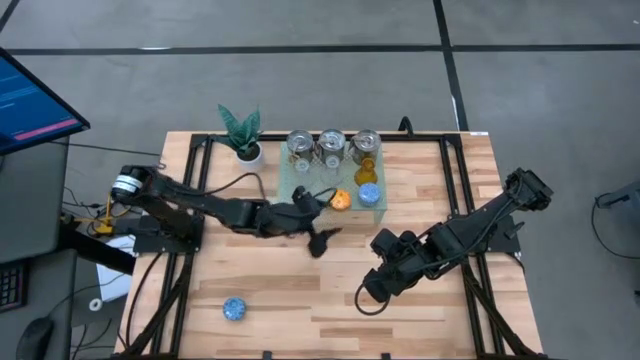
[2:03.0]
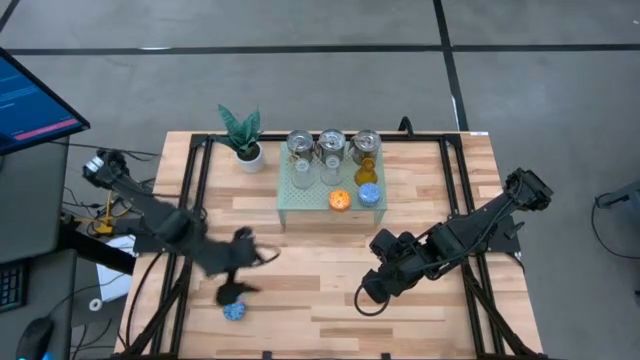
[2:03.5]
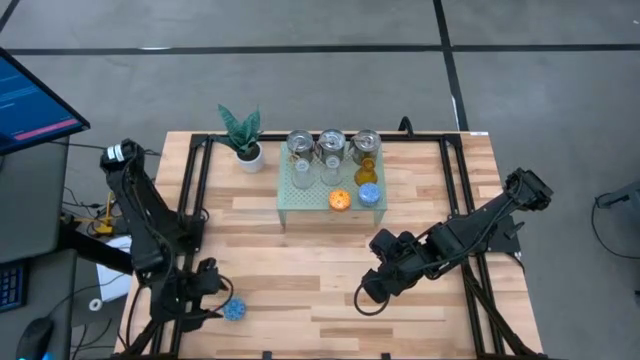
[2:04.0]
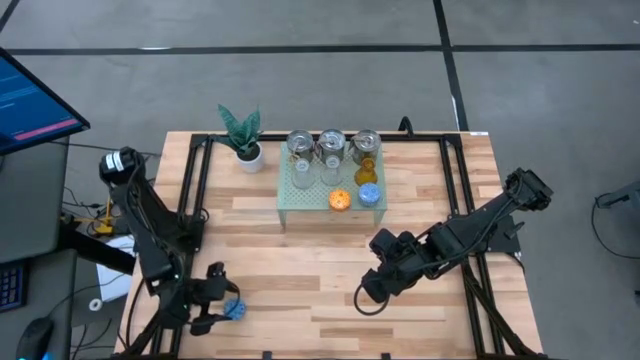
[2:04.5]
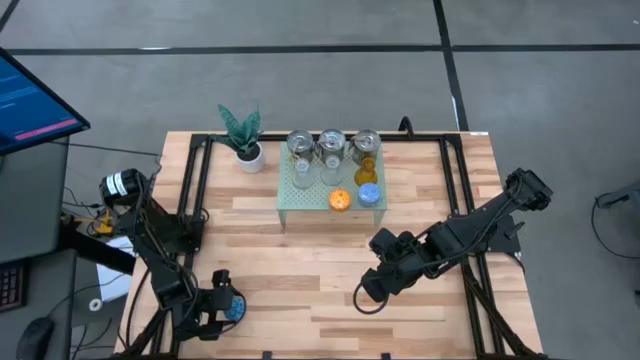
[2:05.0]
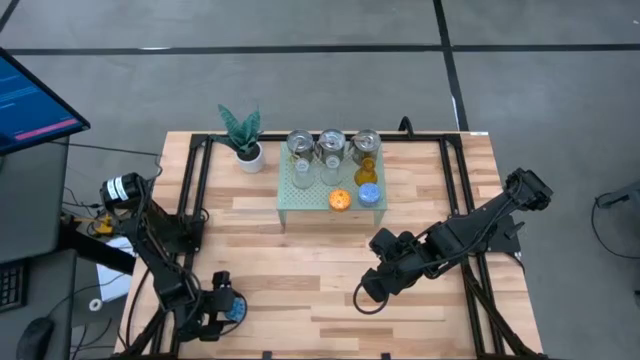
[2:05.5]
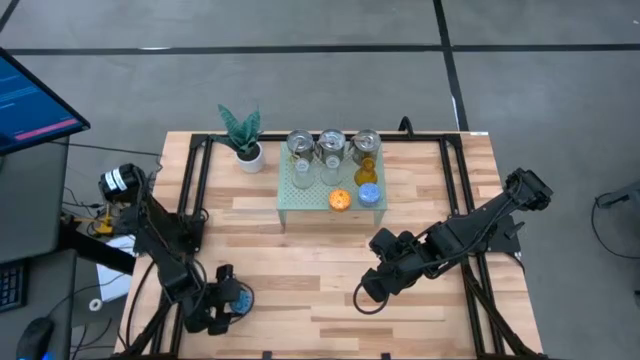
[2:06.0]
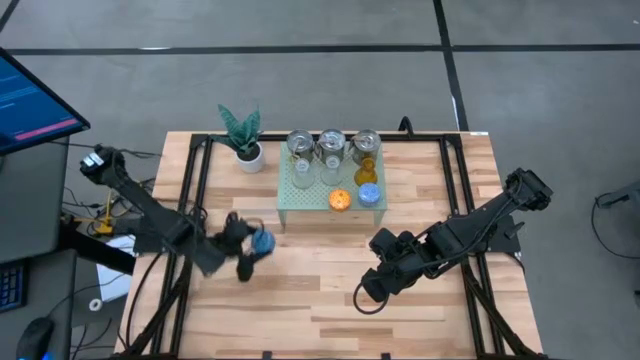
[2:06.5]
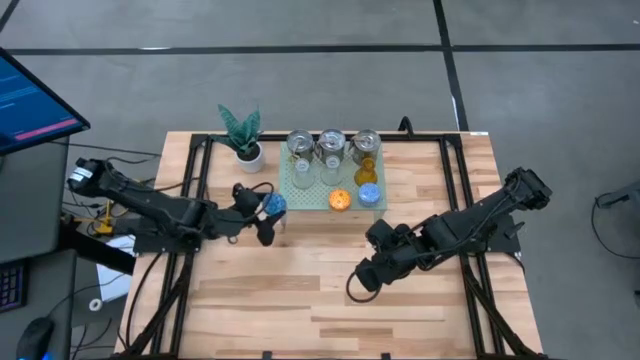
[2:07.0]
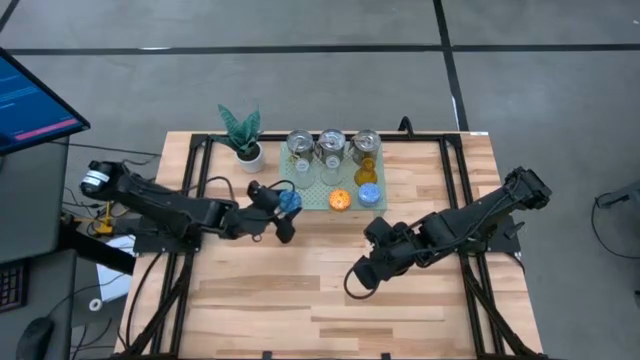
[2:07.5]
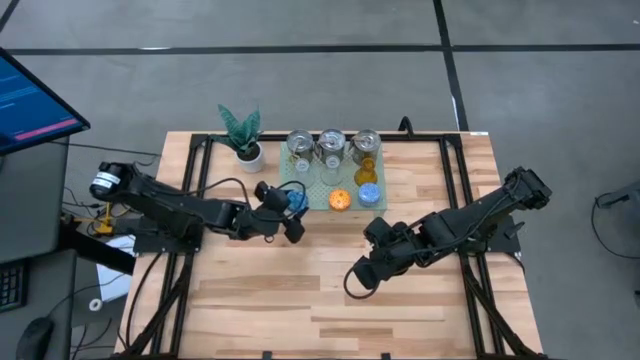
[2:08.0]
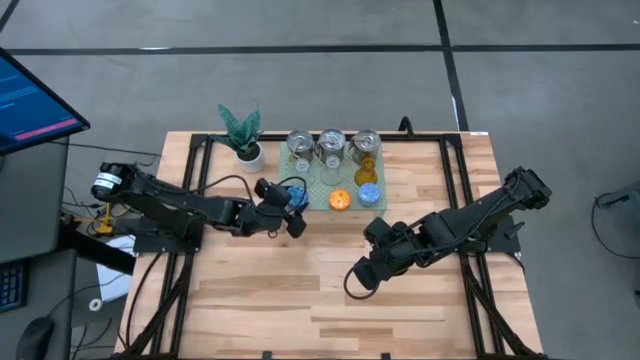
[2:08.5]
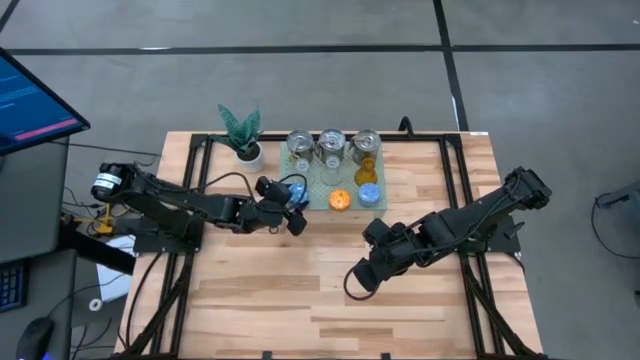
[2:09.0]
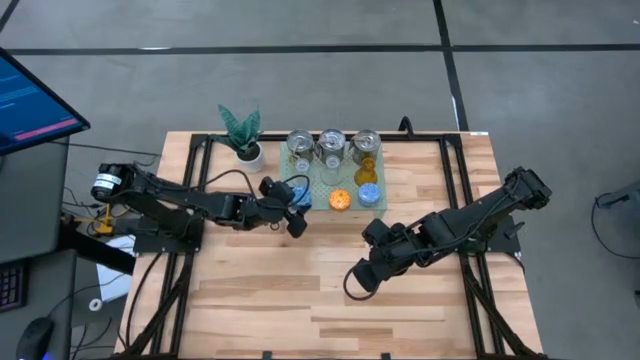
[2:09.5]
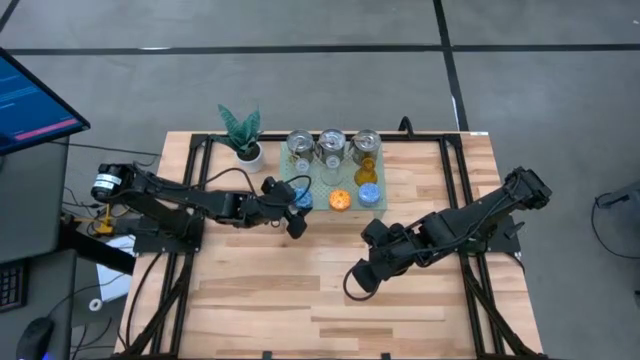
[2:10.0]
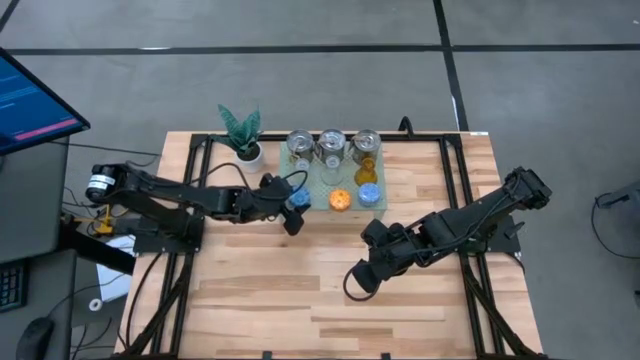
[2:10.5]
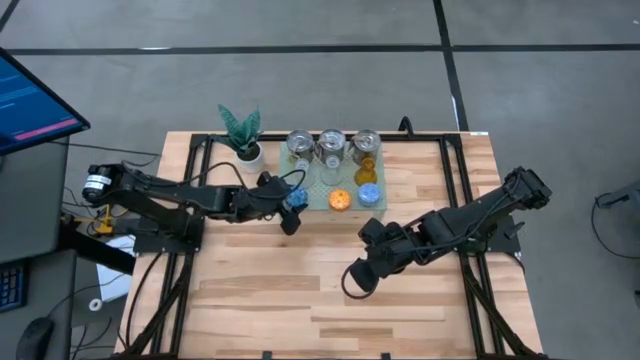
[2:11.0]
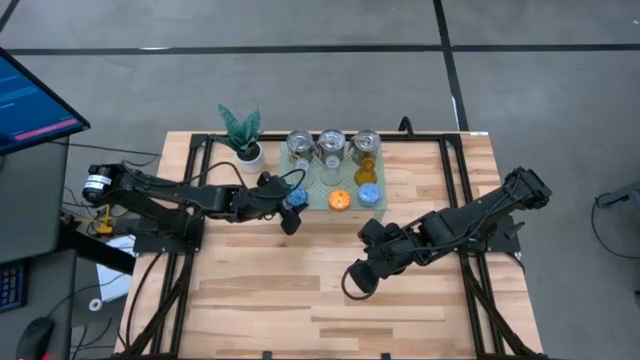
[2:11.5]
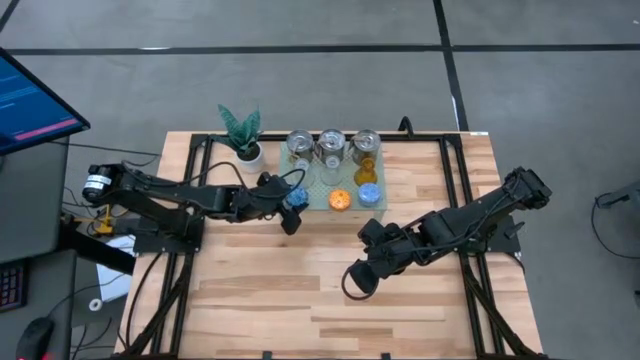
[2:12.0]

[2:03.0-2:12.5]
Task: Pick & Place candle stick holders
Put the blue scented candle on the shelf

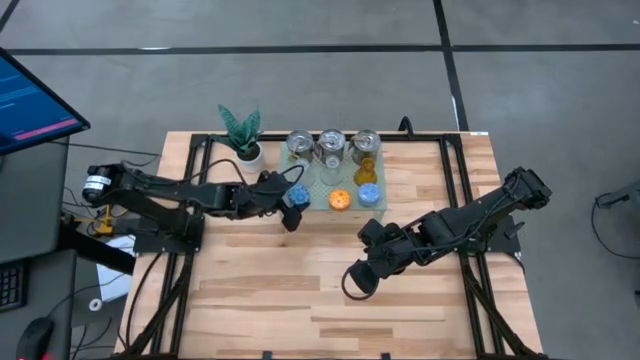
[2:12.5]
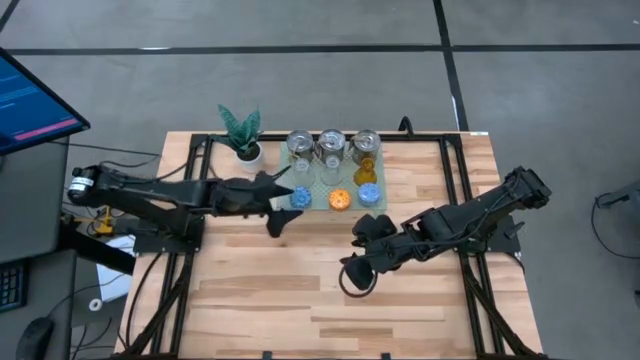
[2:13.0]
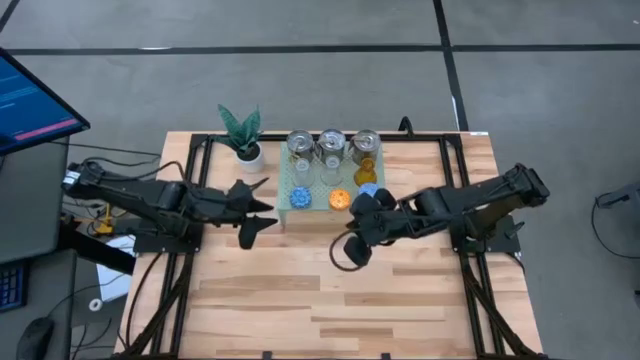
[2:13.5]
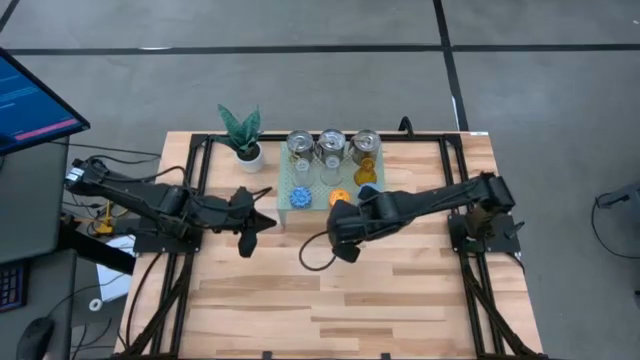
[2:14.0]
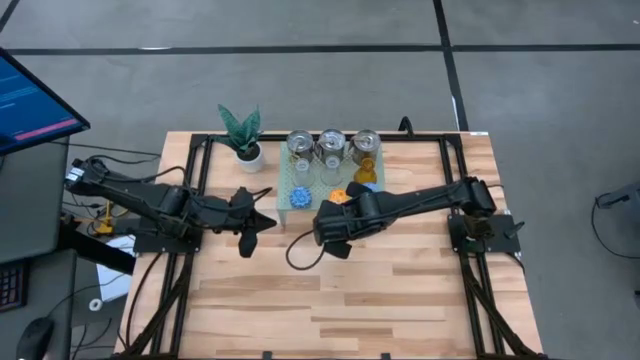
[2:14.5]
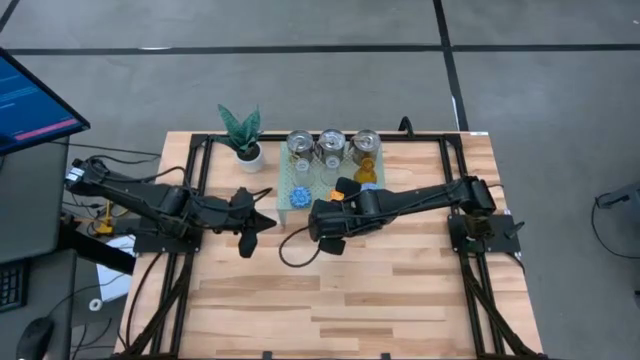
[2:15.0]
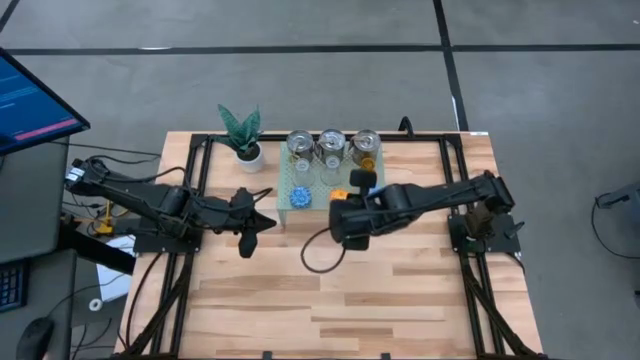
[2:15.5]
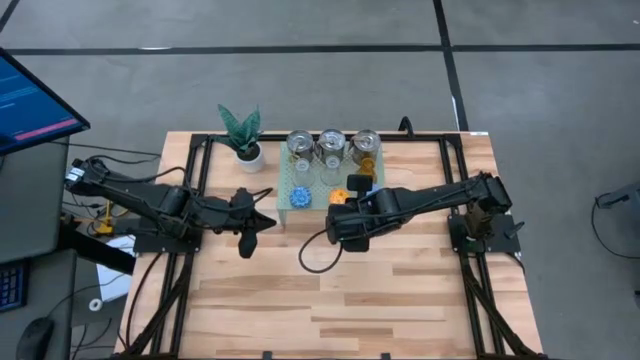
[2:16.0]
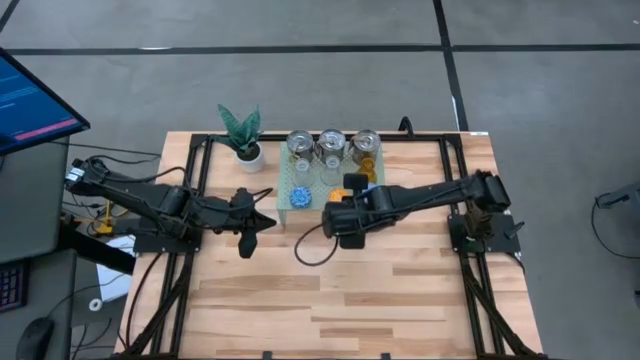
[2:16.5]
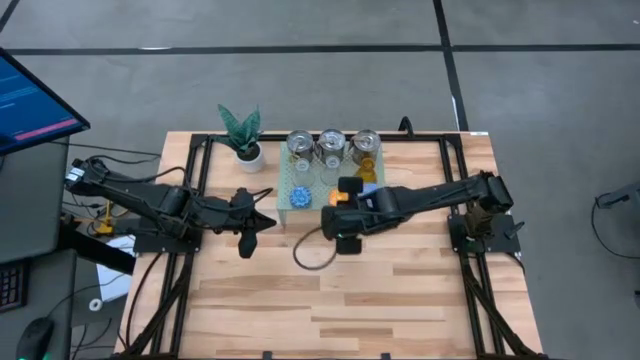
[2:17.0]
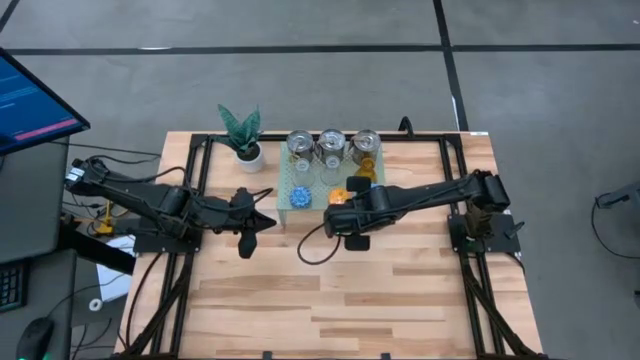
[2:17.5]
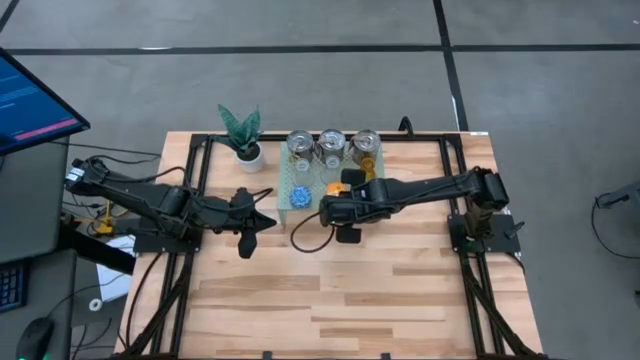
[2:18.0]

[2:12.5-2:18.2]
Adjust the brown scented candle on the shelf

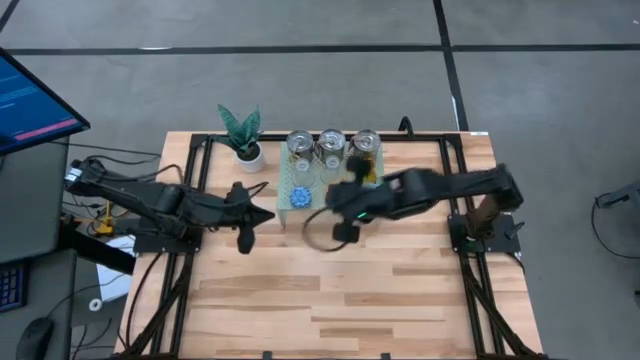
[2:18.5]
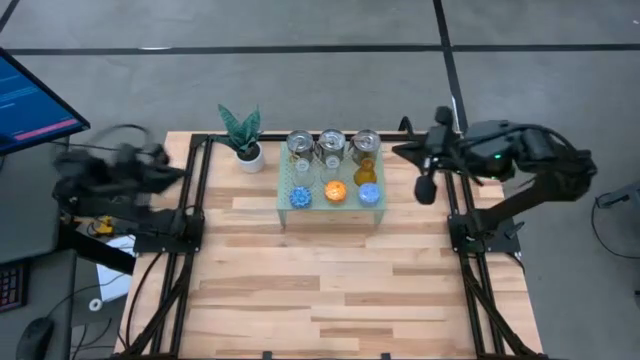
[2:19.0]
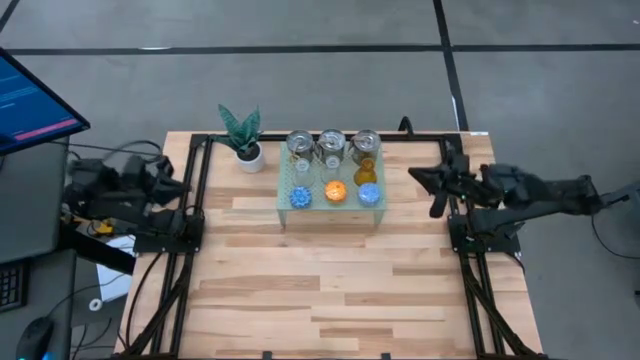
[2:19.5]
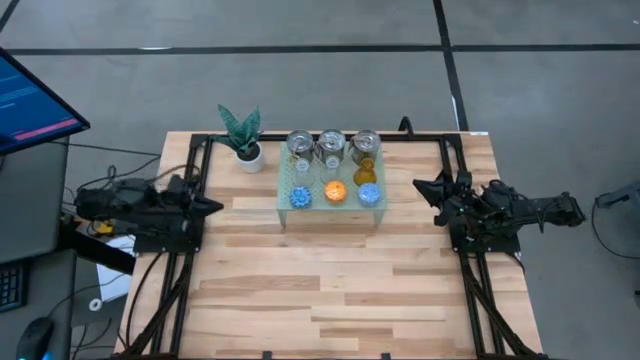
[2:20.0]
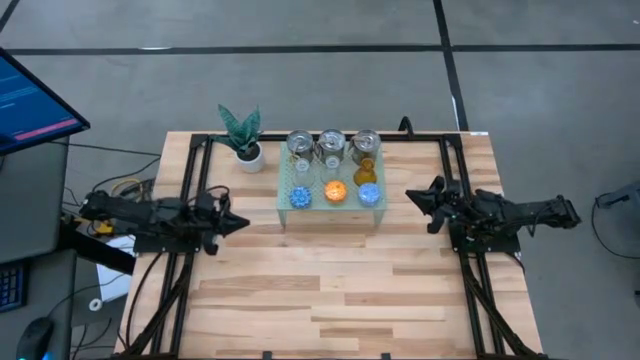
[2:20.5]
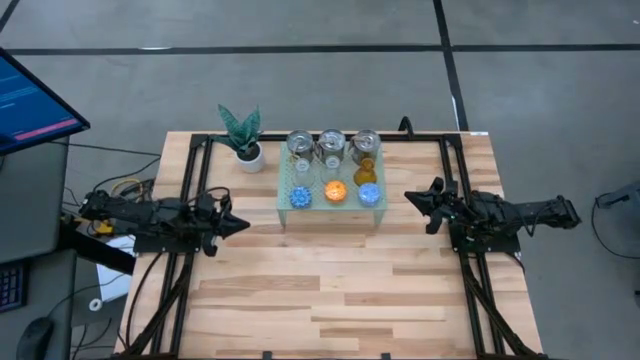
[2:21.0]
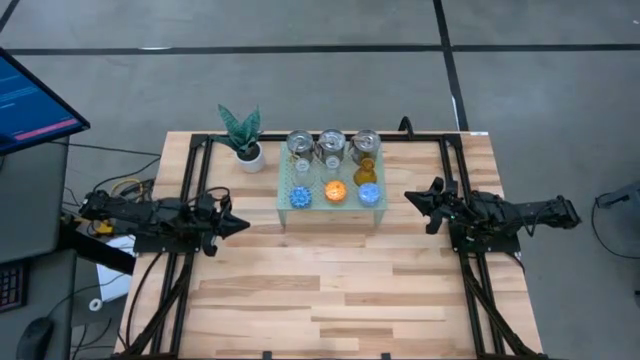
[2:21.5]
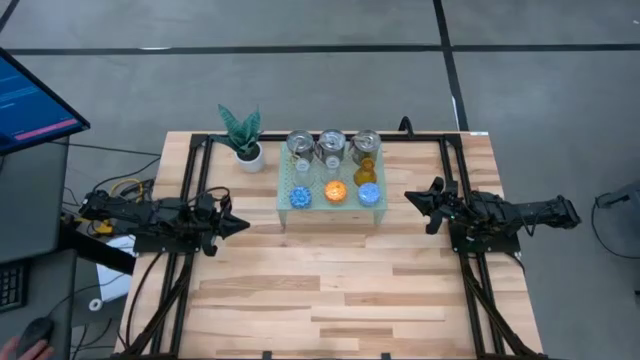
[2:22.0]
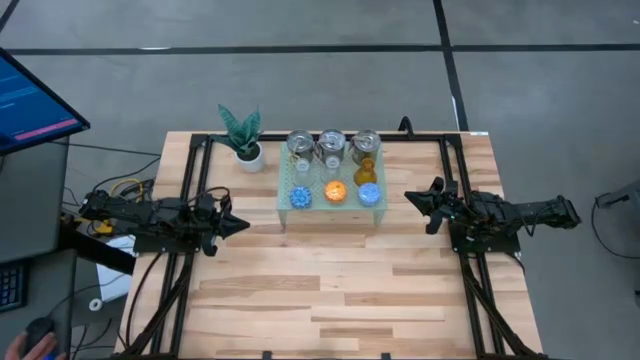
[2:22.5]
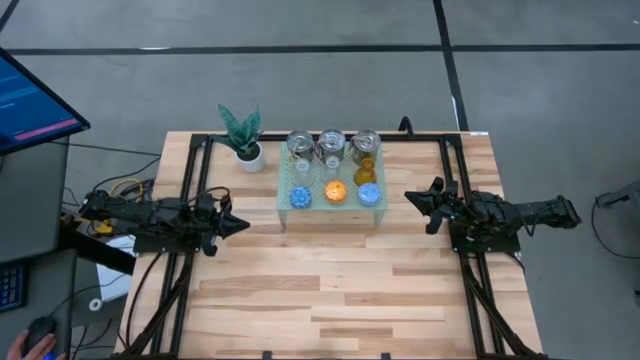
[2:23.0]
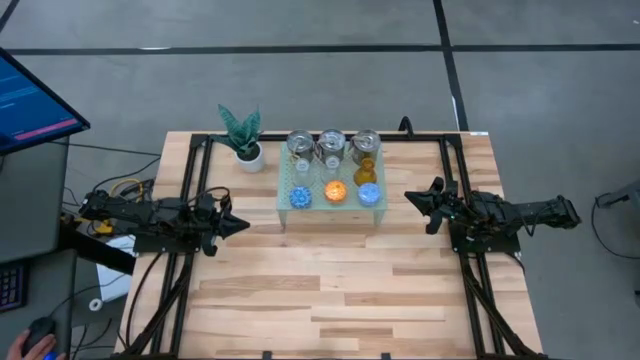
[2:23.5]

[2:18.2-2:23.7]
Return to Home Position

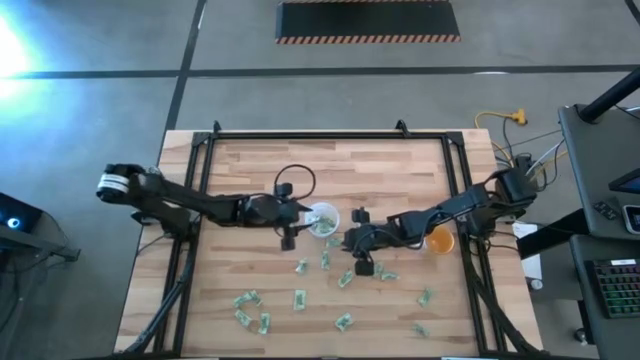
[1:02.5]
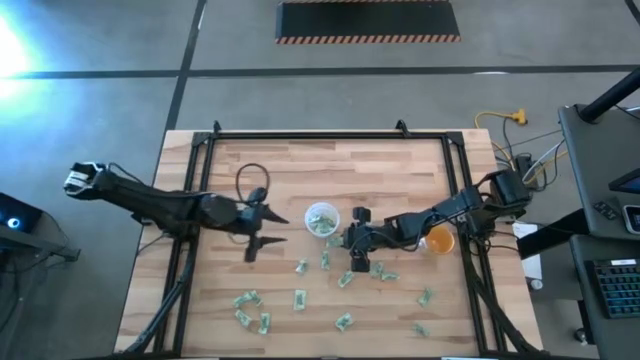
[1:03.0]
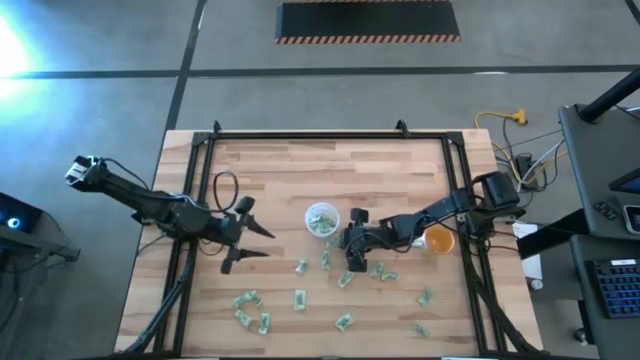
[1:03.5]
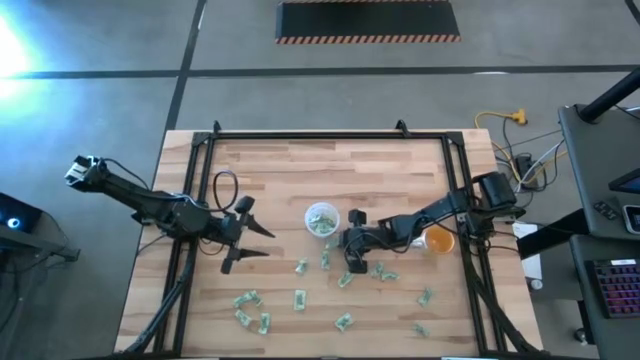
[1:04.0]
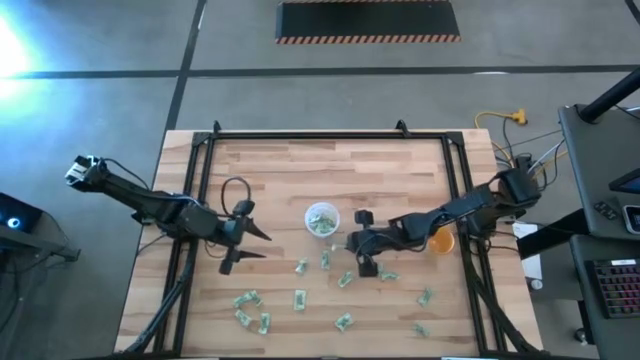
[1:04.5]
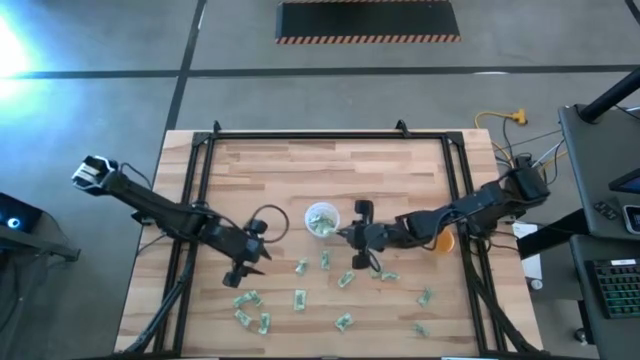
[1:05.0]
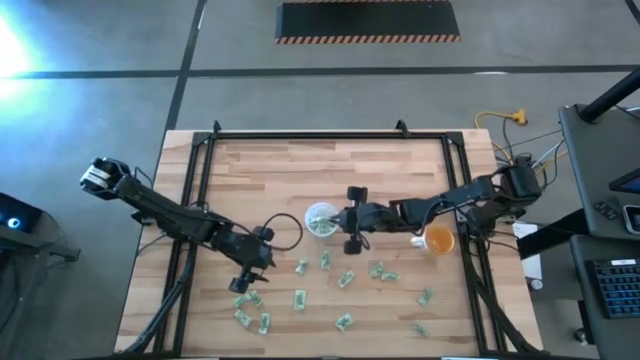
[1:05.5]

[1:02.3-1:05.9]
Task: Pick and place Stevia / Truvia into bins
Put the light green stevia packet into the transparent container
